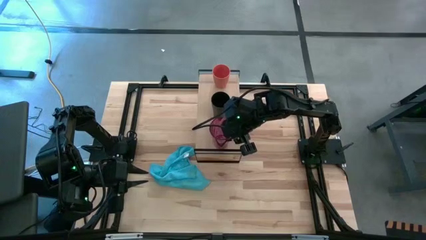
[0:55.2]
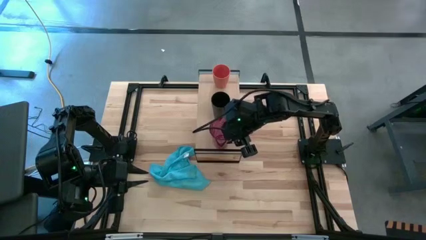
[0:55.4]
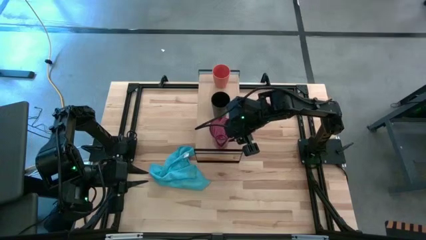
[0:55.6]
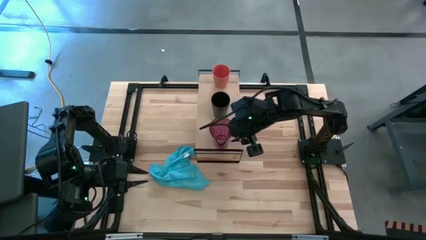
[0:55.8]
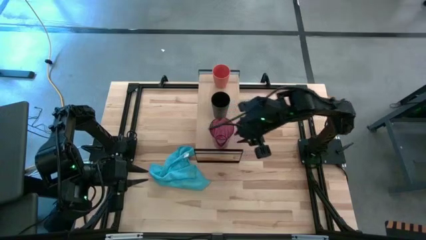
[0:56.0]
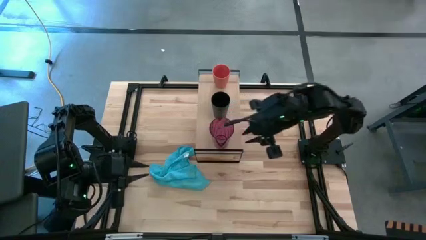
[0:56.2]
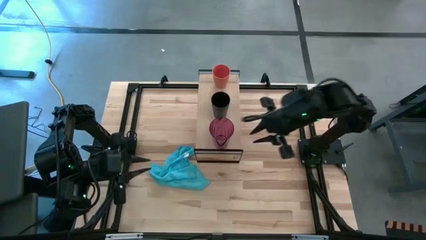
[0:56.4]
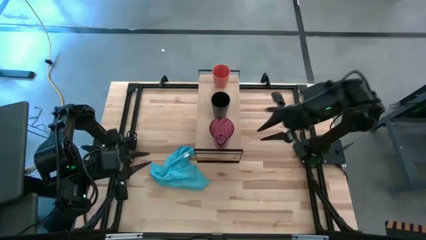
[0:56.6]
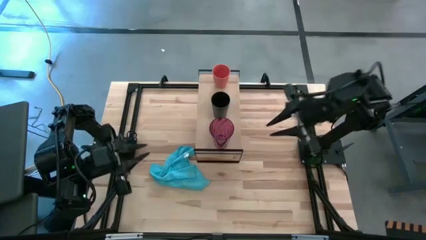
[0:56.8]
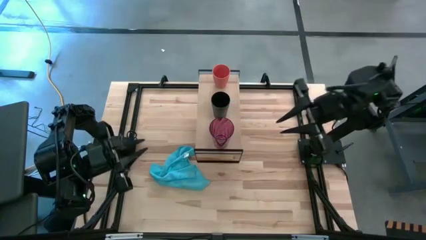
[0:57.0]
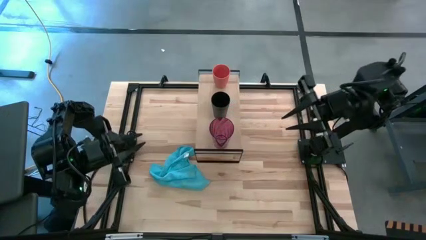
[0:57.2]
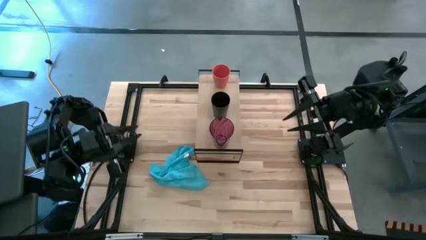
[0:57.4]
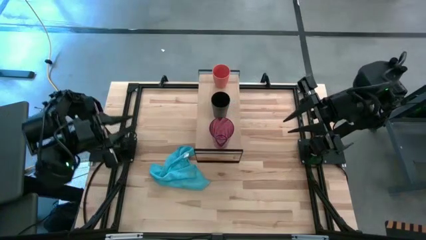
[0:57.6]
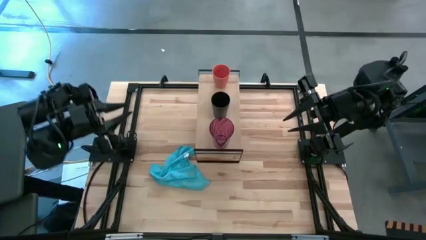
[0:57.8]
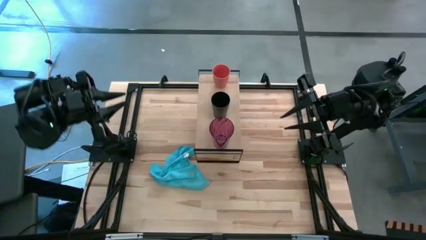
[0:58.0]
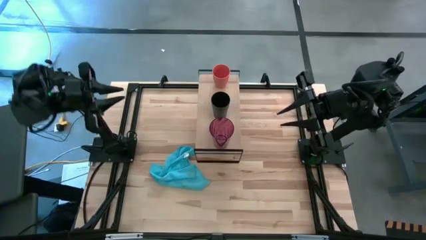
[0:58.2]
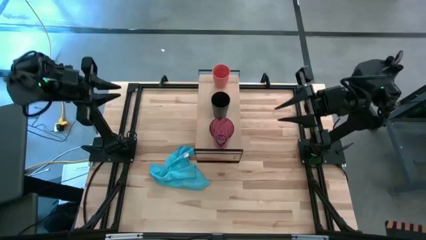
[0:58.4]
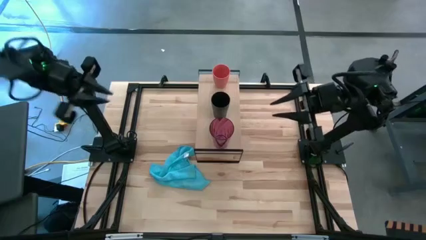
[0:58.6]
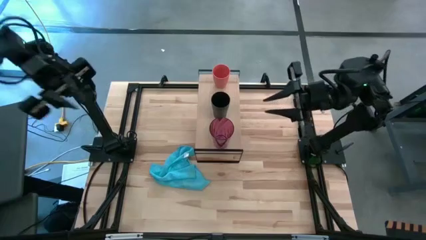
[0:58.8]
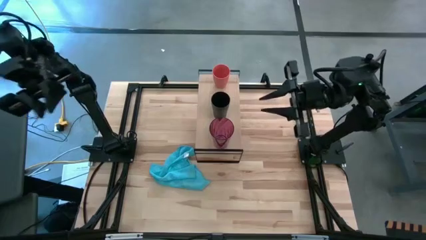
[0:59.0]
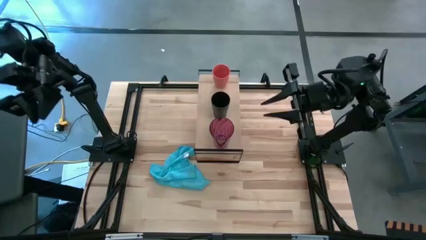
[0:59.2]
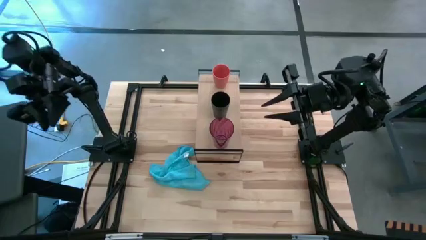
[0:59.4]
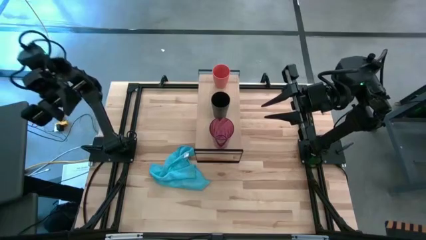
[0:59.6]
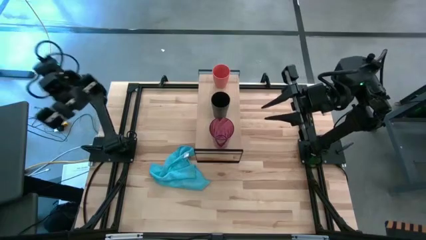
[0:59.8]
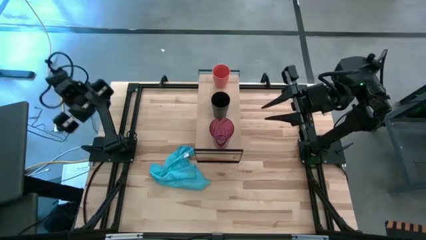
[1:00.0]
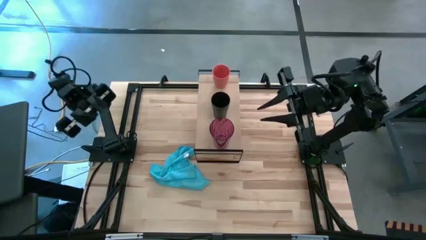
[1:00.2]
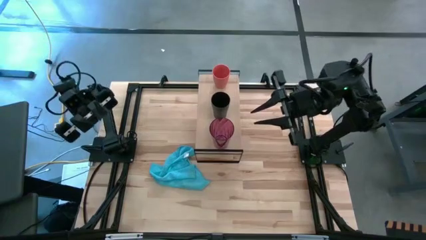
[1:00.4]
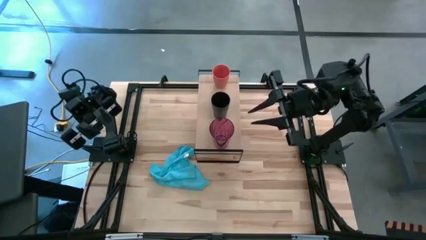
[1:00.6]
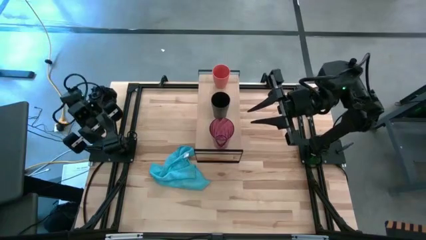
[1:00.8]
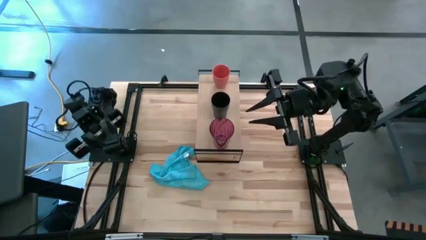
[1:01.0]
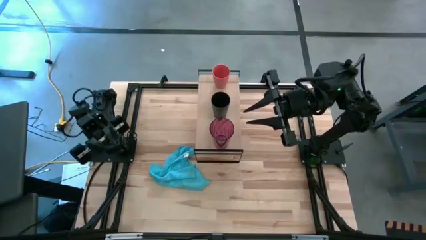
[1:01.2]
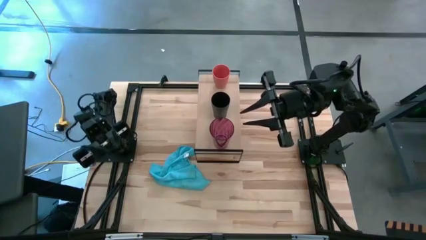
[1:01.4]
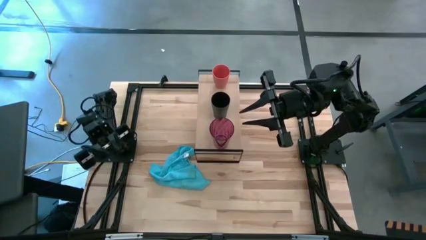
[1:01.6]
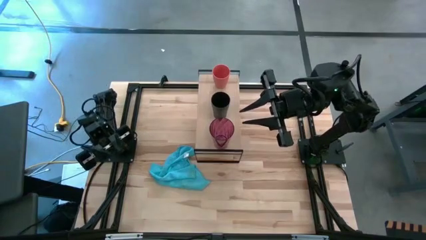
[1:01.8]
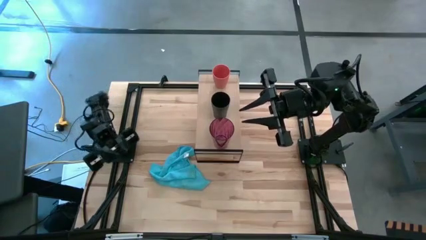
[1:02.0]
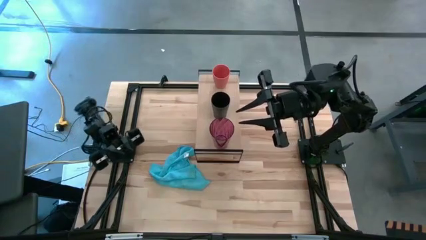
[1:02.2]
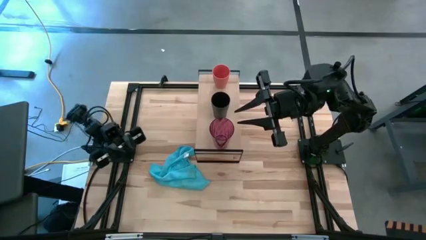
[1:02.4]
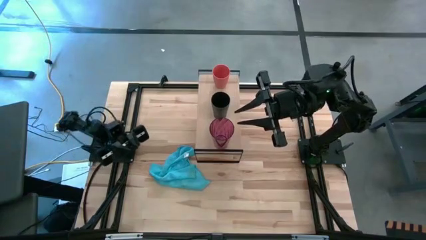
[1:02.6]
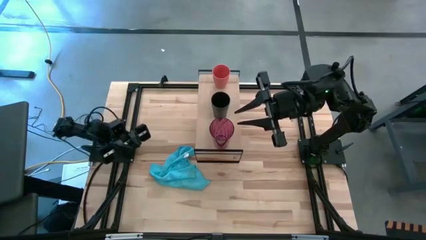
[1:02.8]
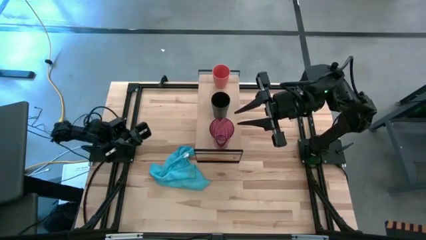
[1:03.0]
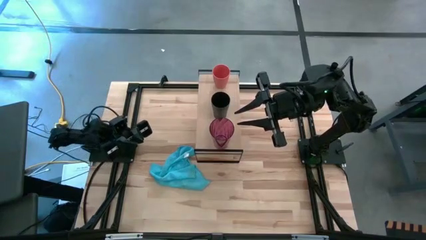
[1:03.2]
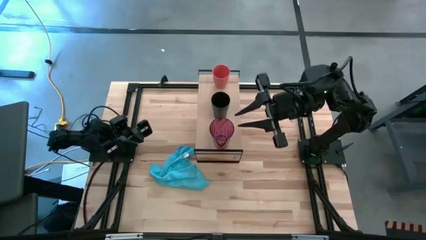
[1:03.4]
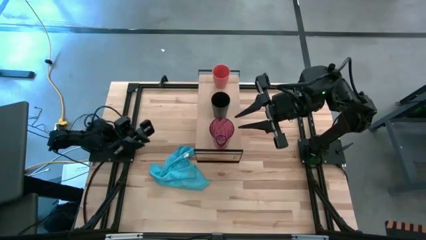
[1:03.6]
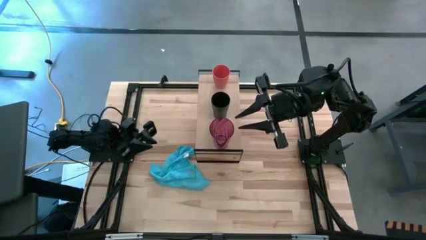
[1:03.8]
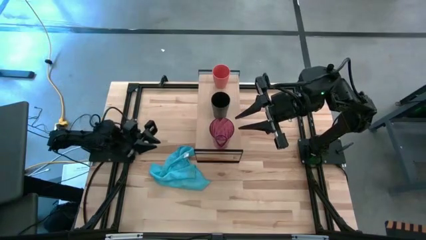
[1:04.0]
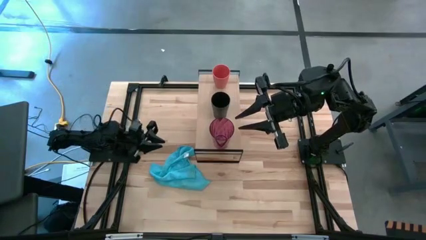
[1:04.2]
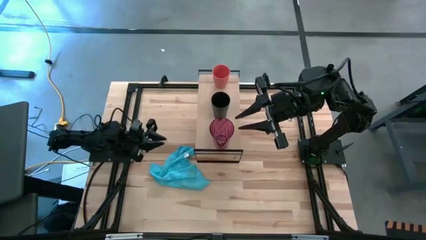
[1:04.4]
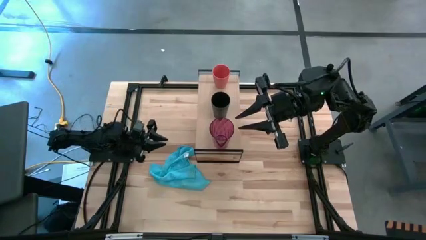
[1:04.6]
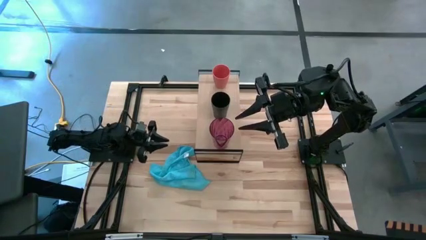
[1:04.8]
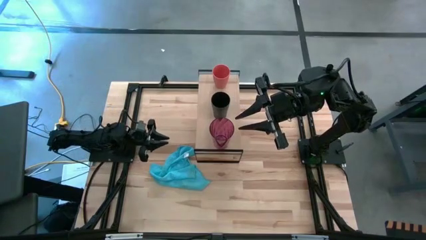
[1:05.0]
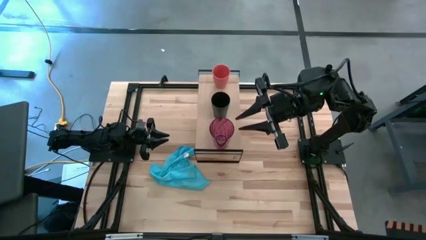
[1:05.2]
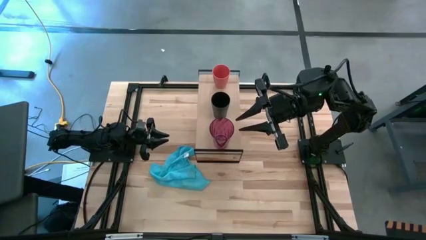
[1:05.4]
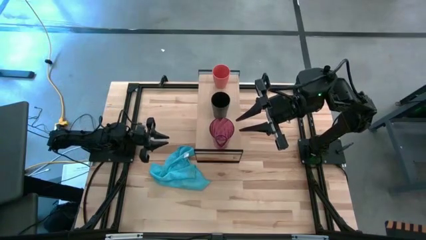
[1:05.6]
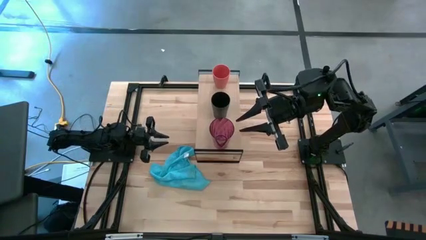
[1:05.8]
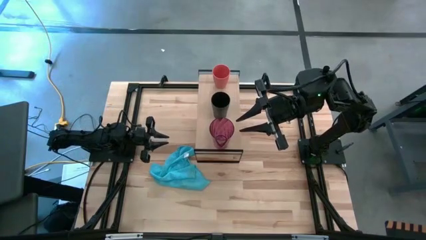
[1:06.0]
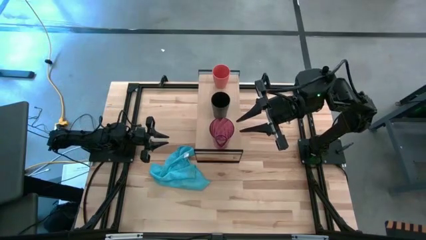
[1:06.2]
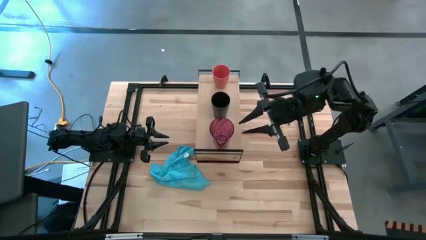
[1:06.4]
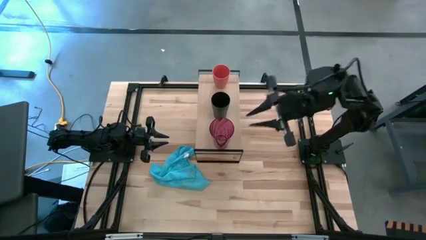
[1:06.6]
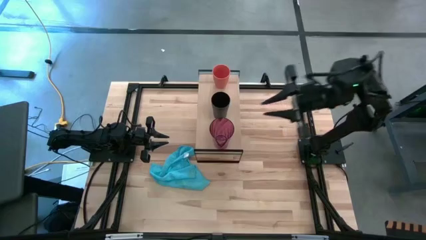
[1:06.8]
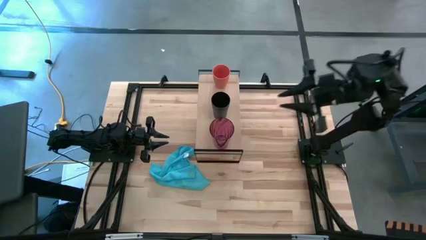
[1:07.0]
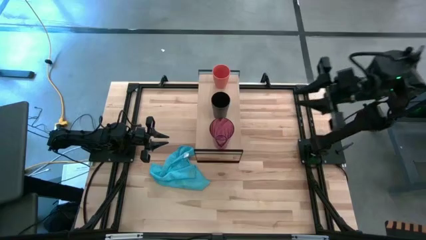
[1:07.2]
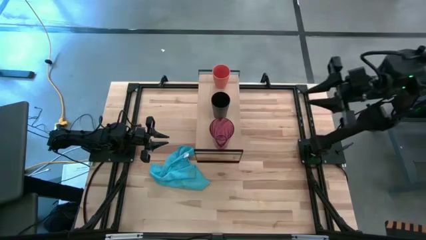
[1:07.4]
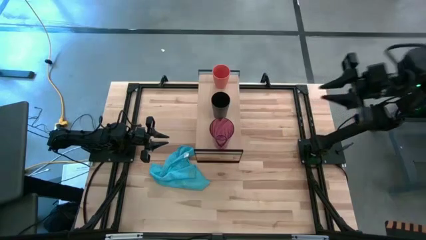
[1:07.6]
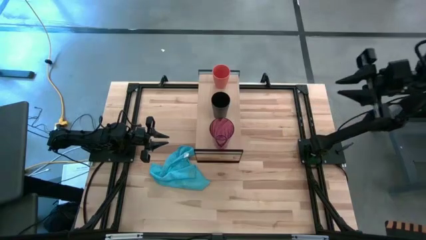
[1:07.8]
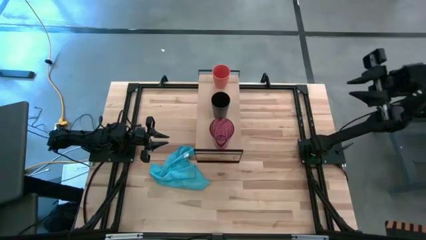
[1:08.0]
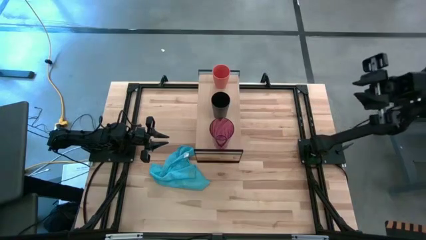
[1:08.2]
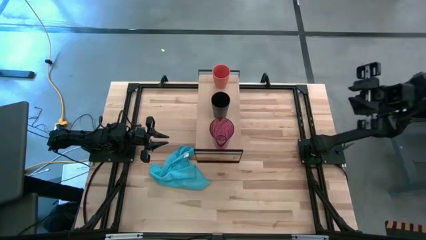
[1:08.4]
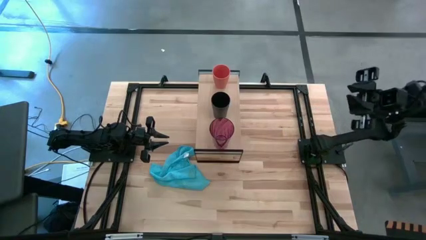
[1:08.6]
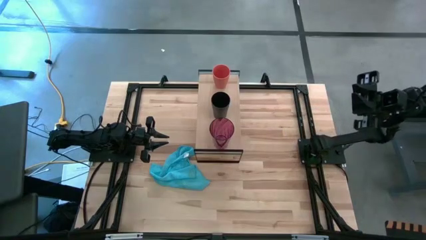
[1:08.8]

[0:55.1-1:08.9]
Task: Stack small to large cups/mugs on shelf
Return to Home Position
